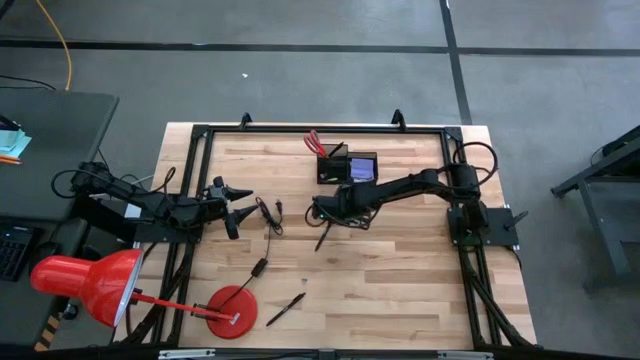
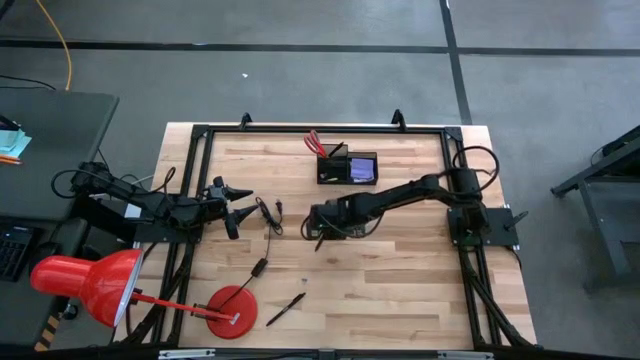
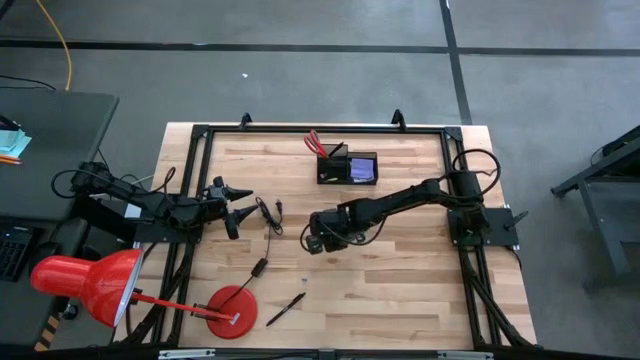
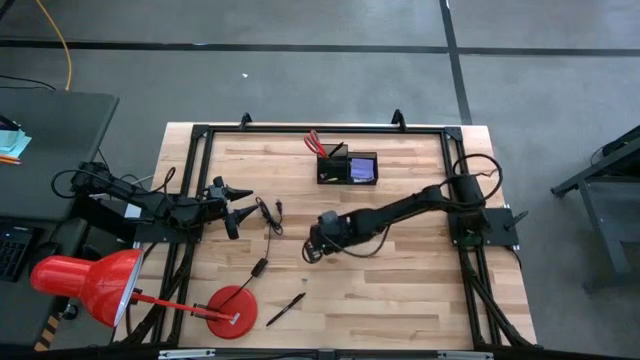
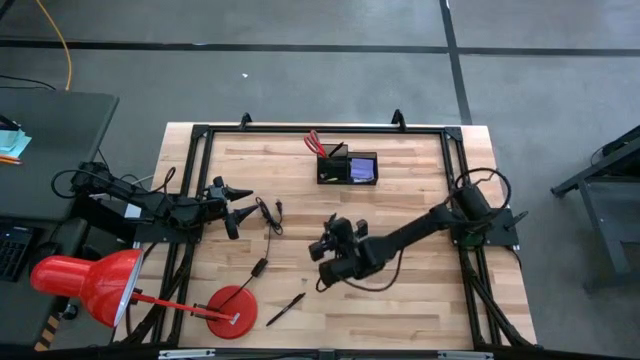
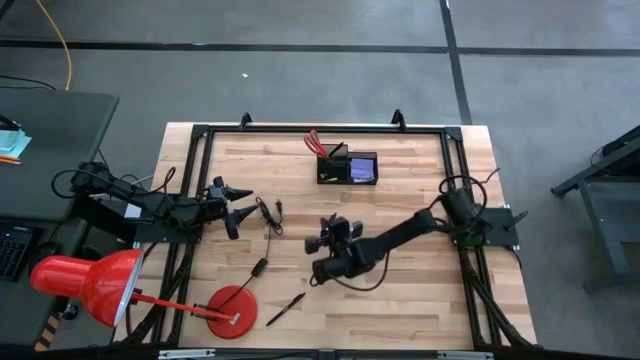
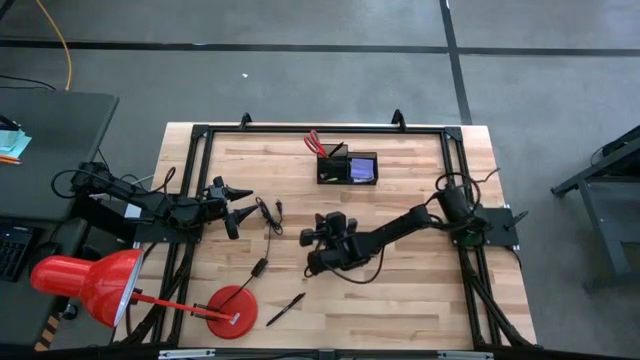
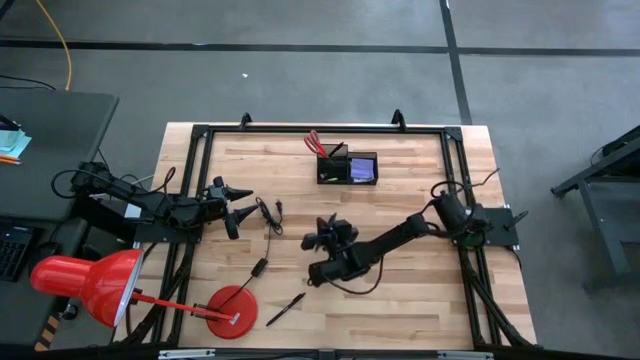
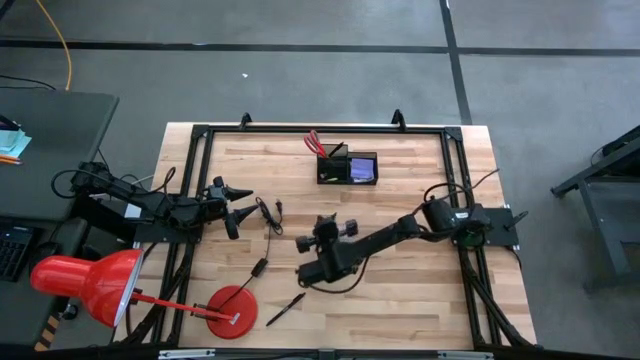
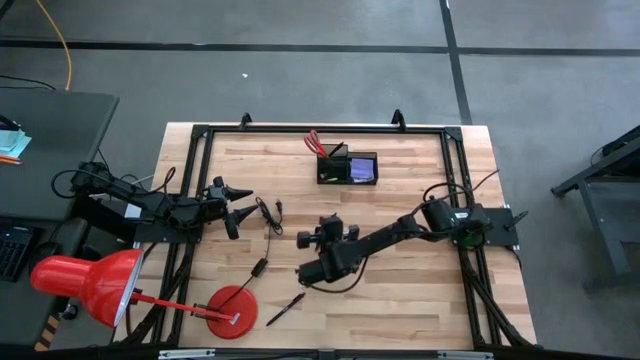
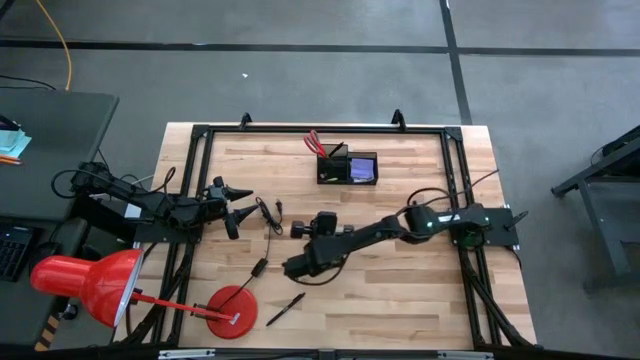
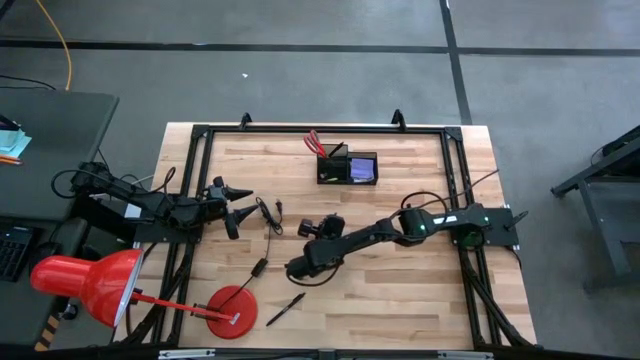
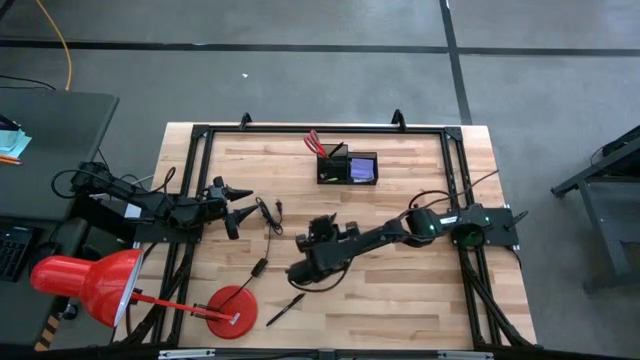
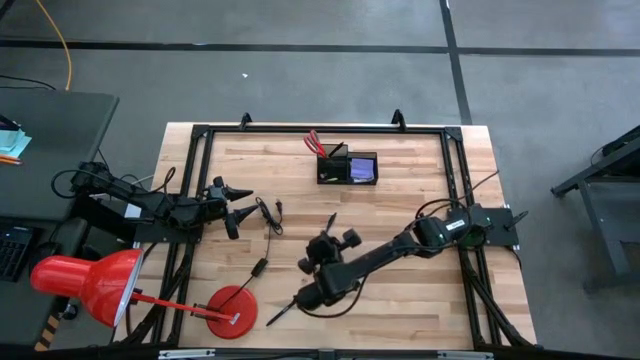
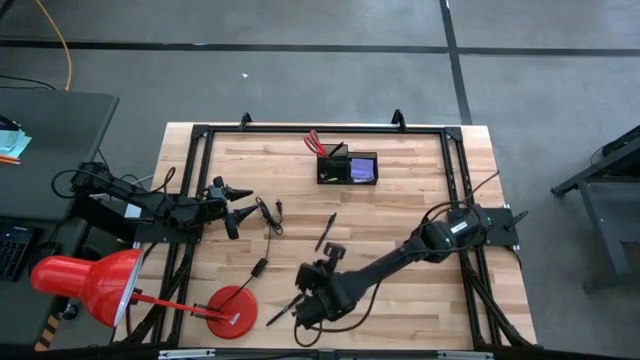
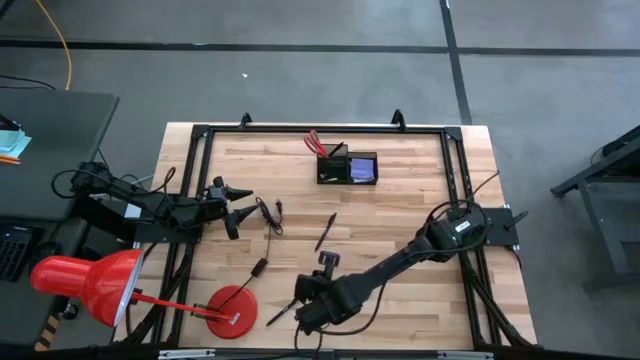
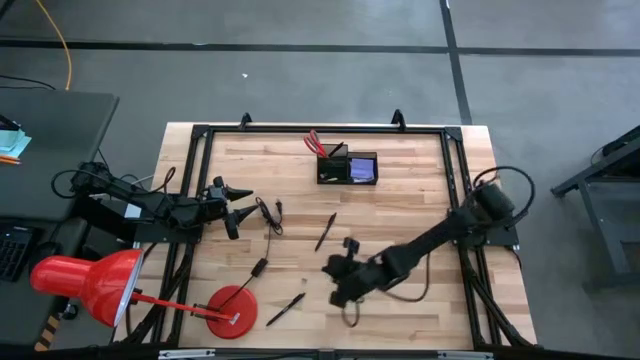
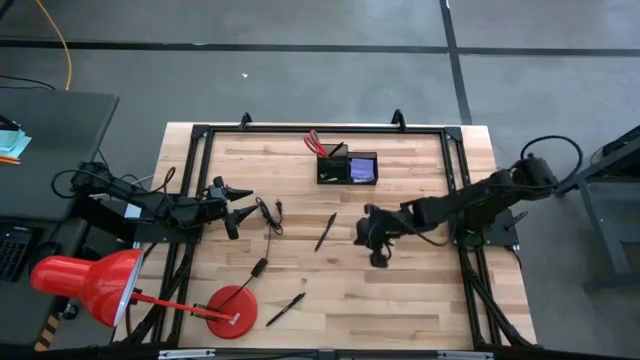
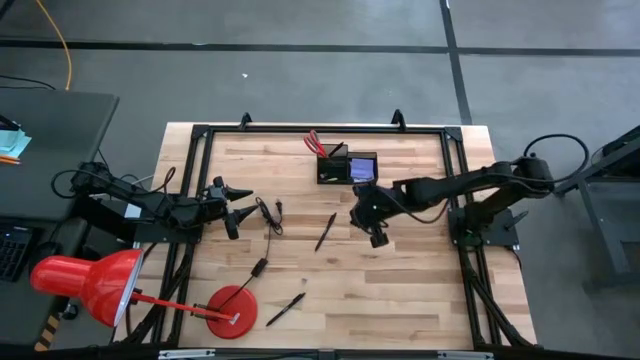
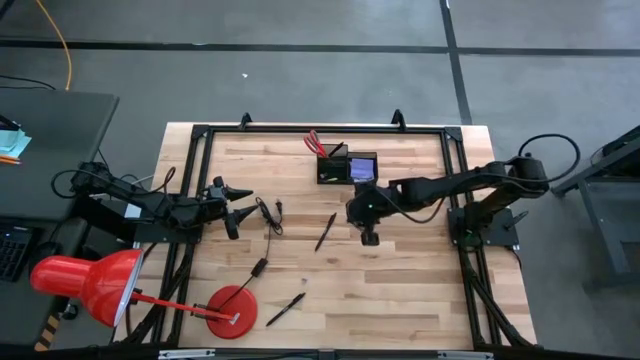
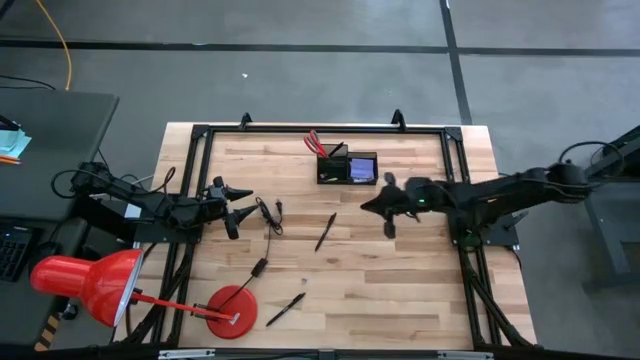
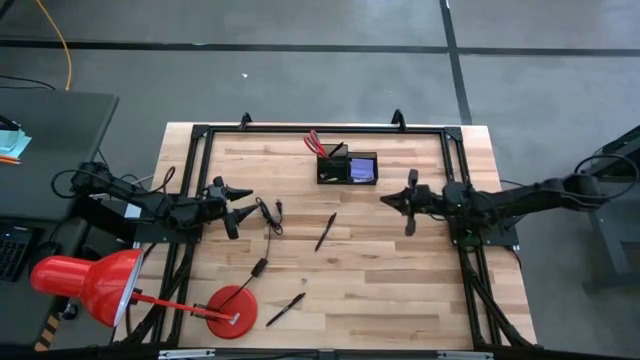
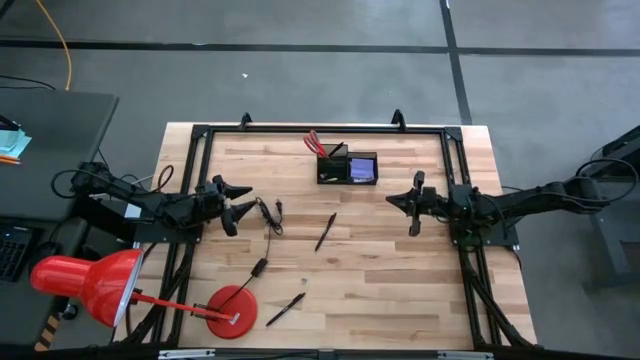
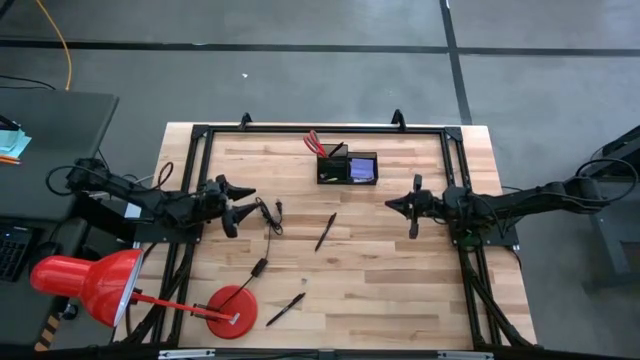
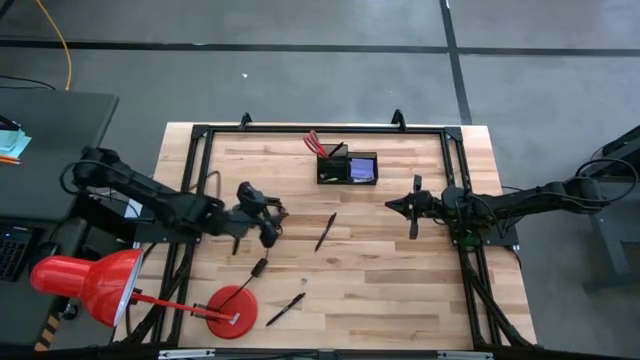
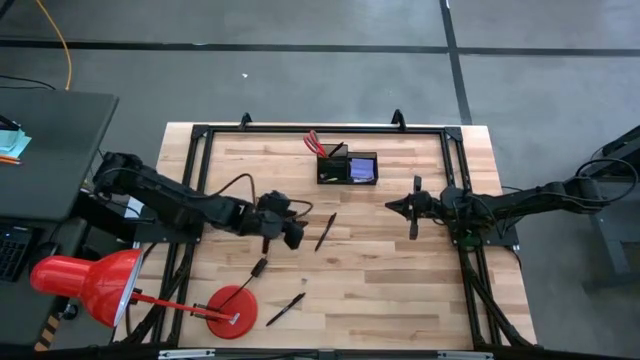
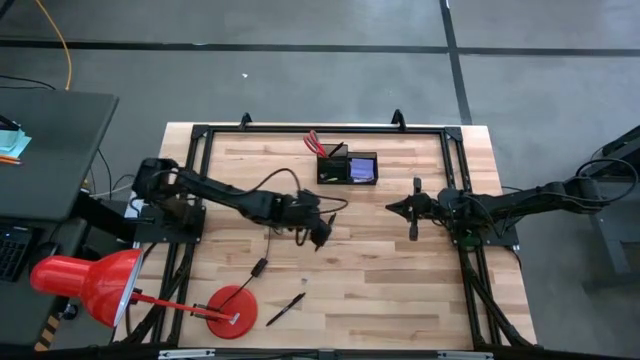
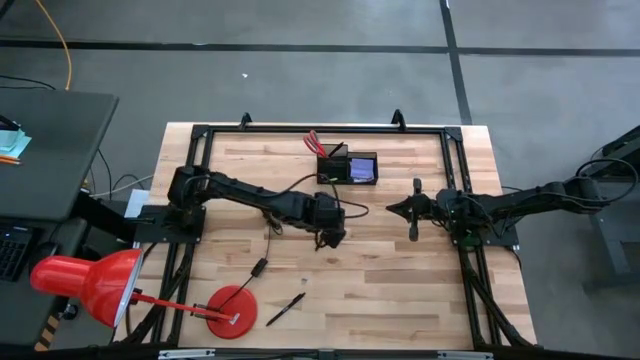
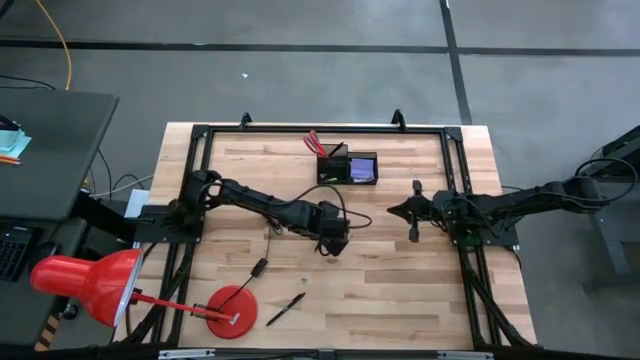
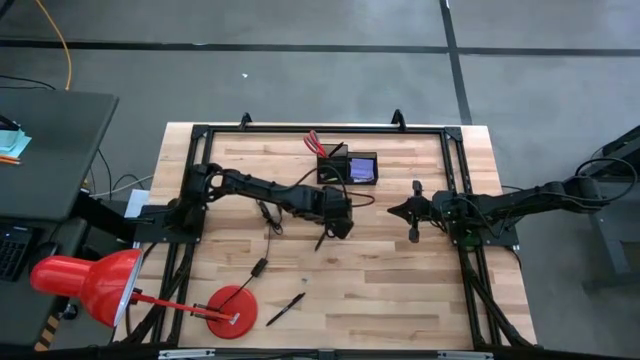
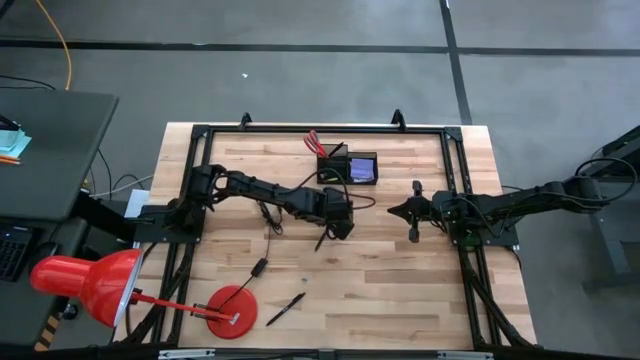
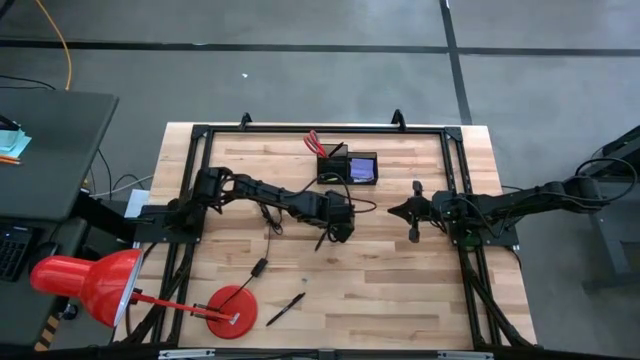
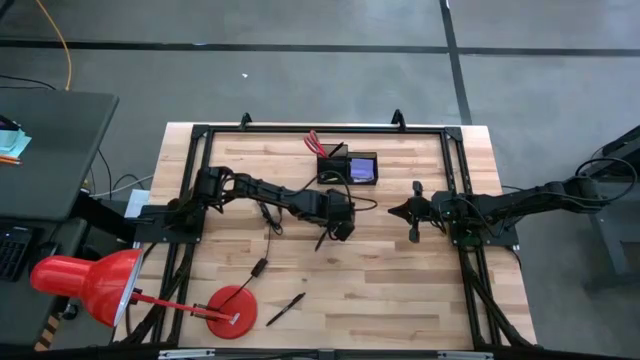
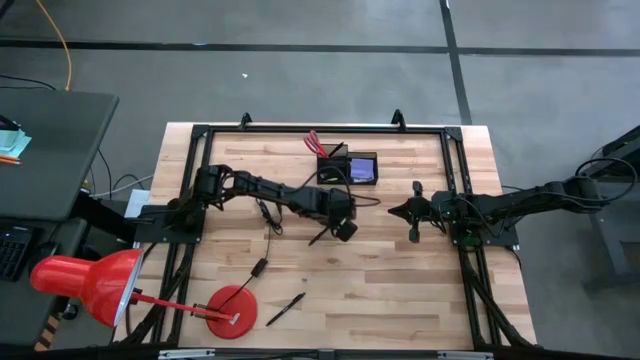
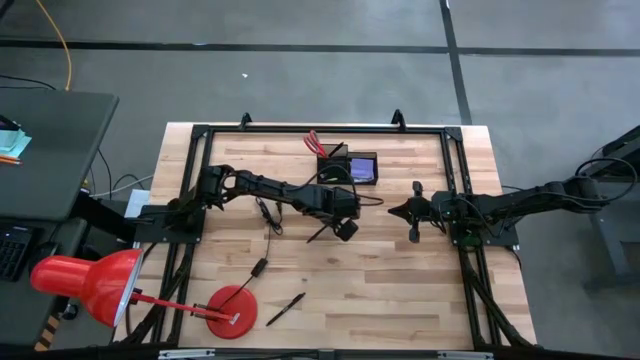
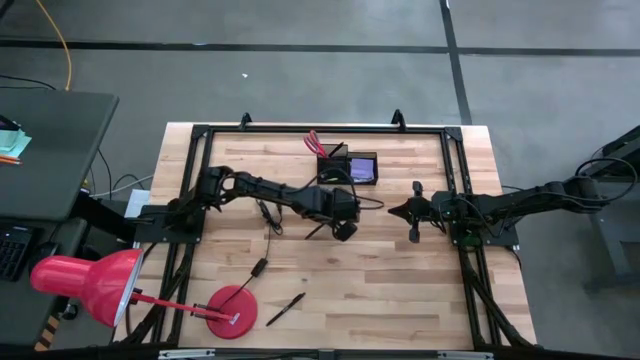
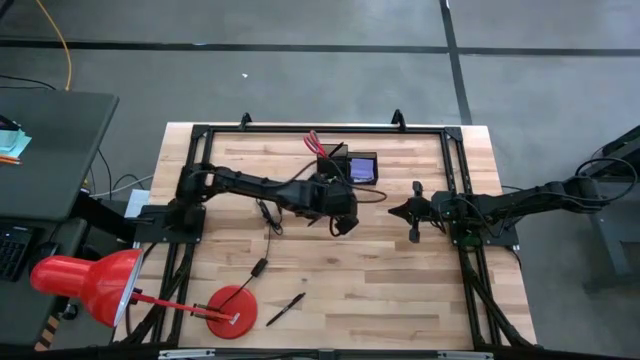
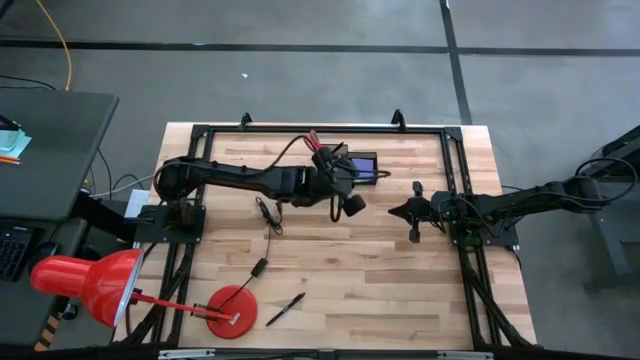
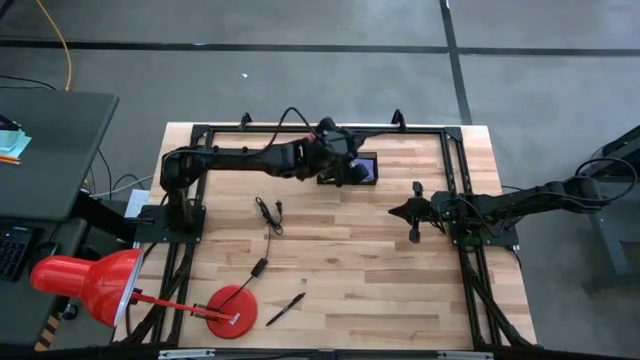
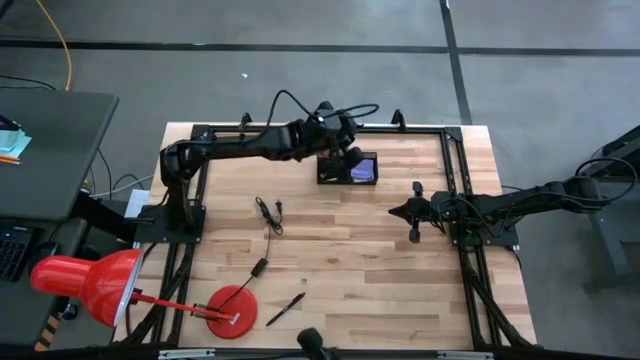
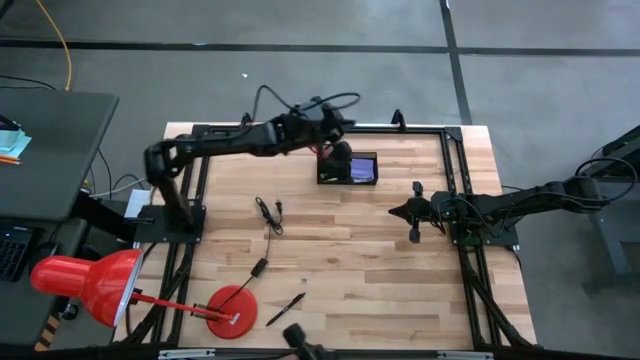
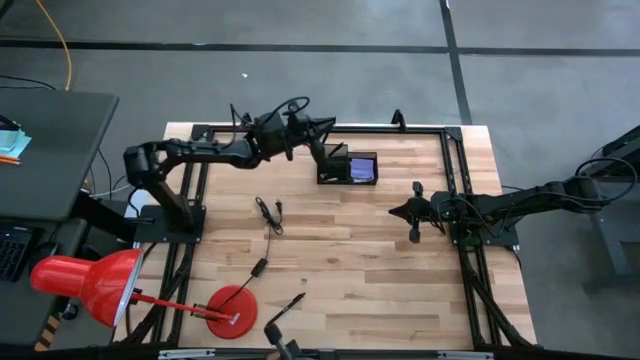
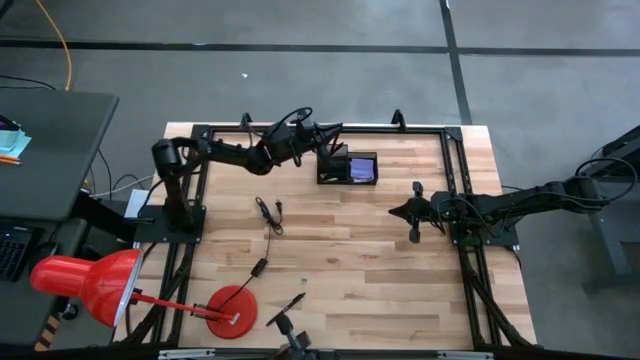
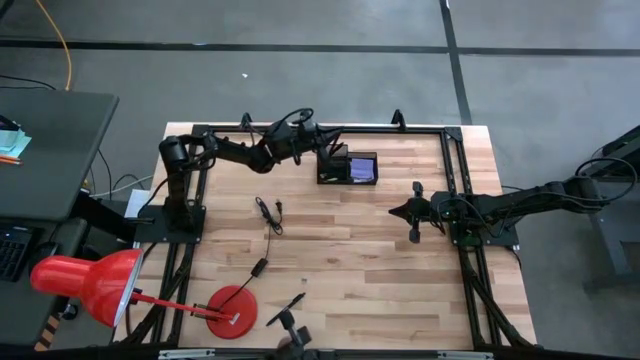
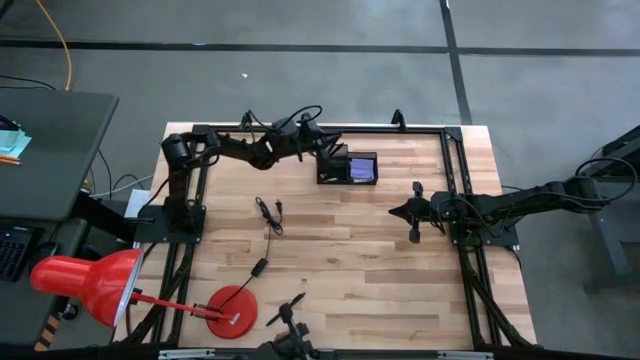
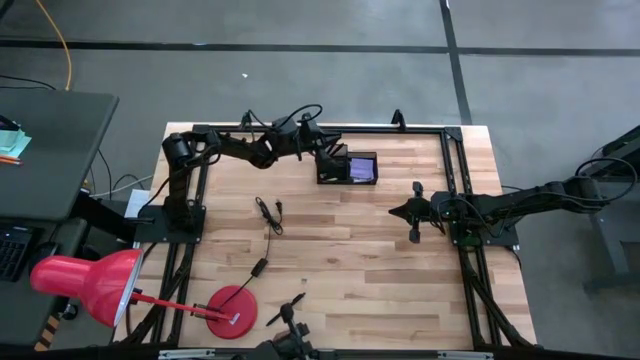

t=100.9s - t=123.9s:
Task: Pick and place office supplies into organizer
Put the top black pen into the mesh desk organizer
